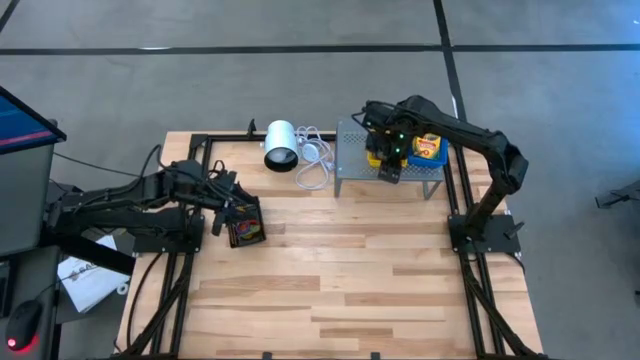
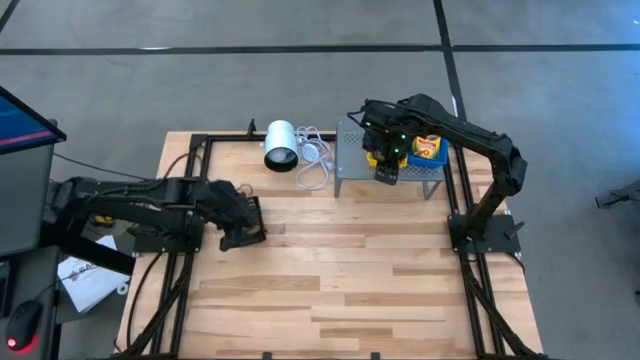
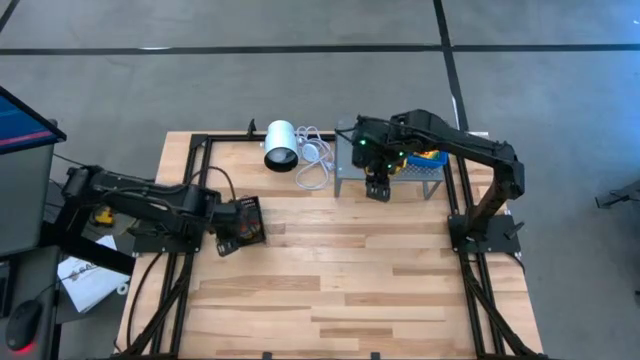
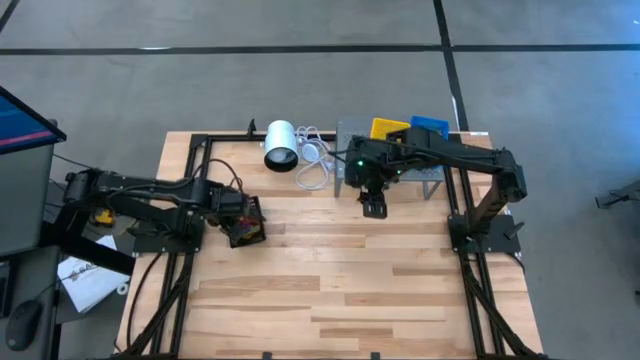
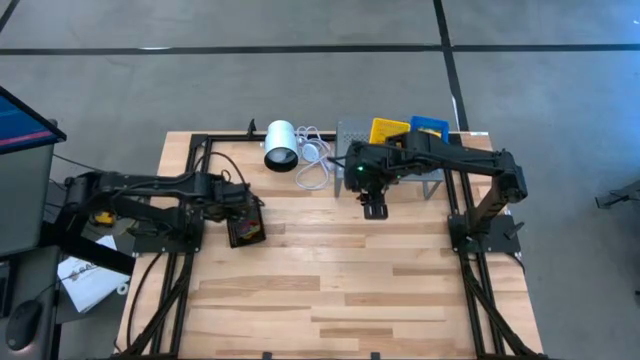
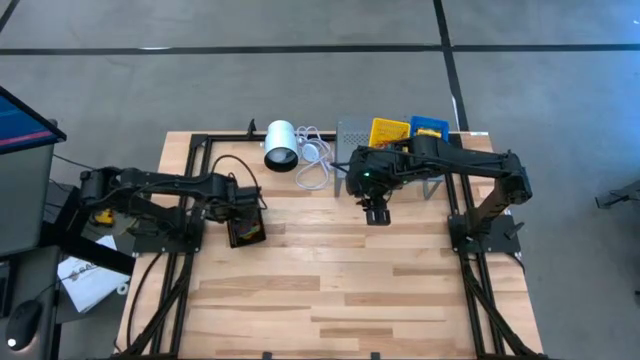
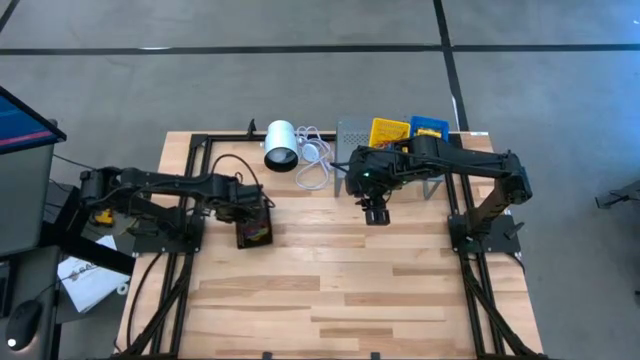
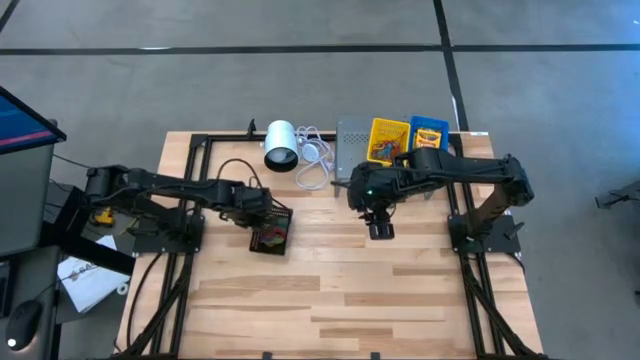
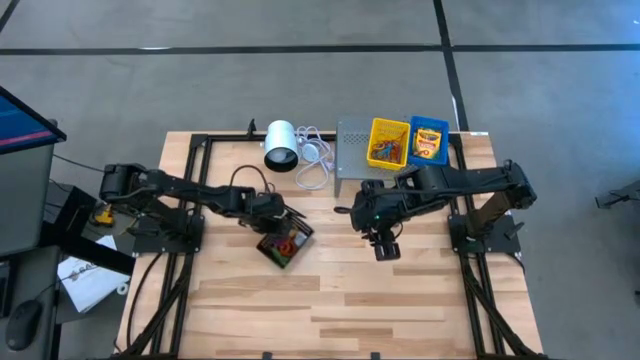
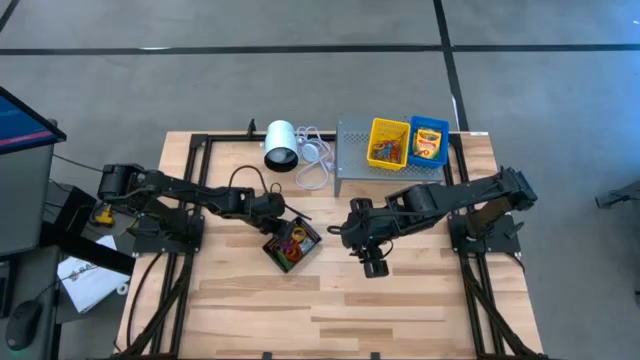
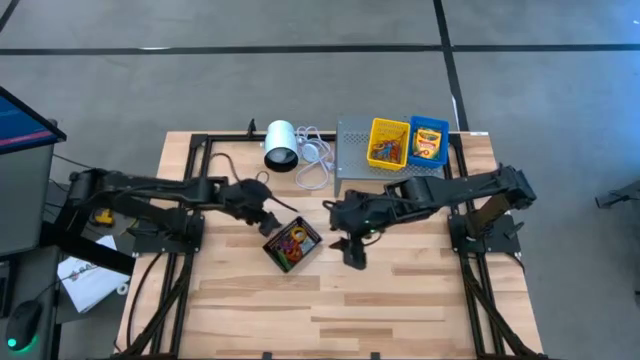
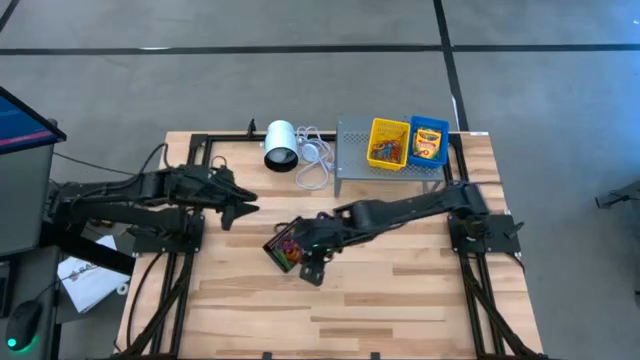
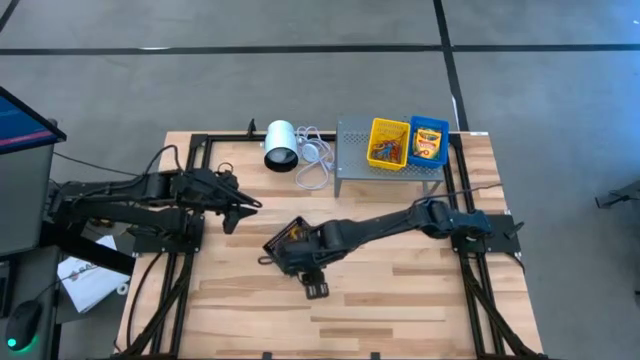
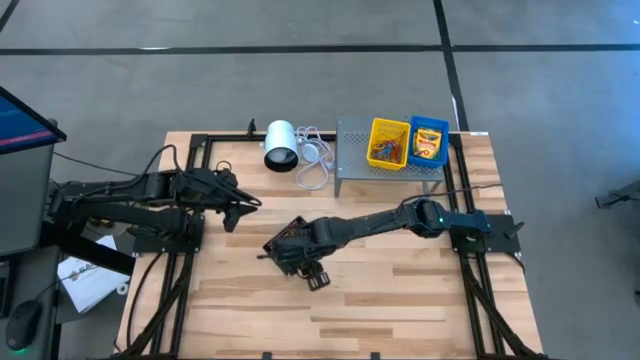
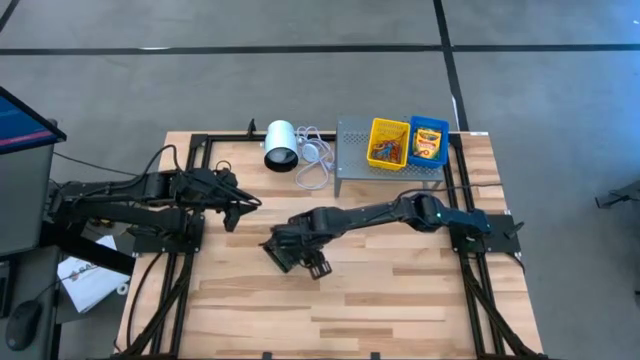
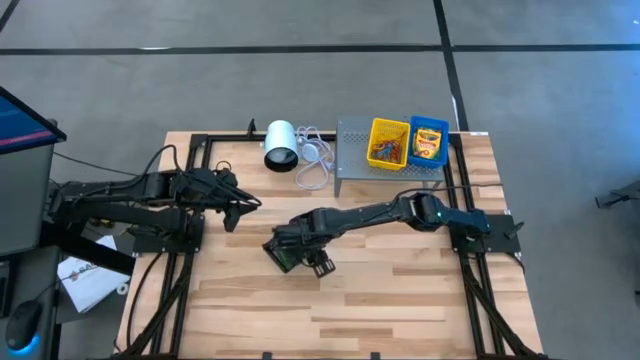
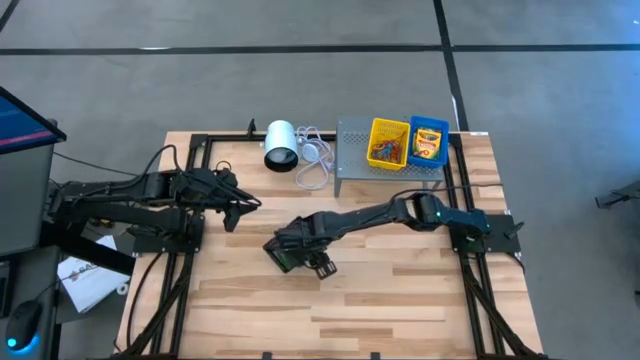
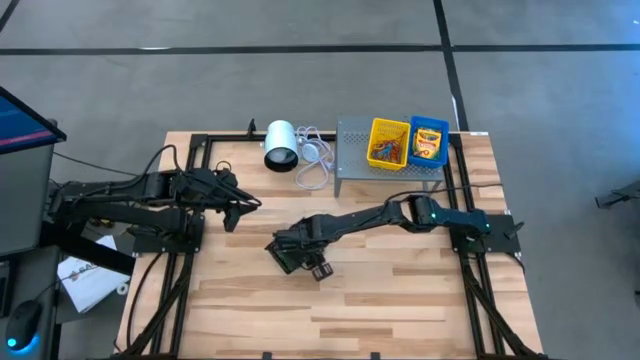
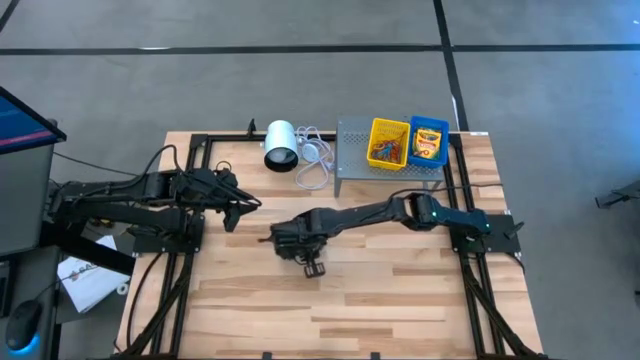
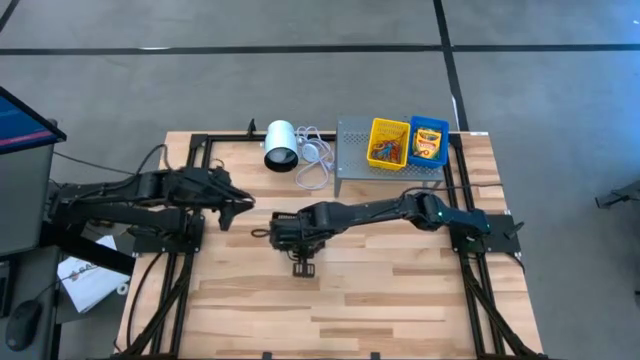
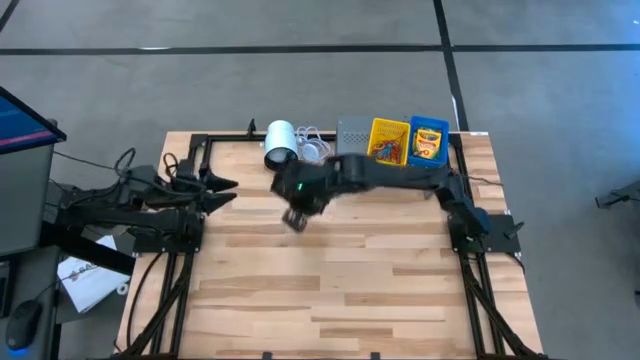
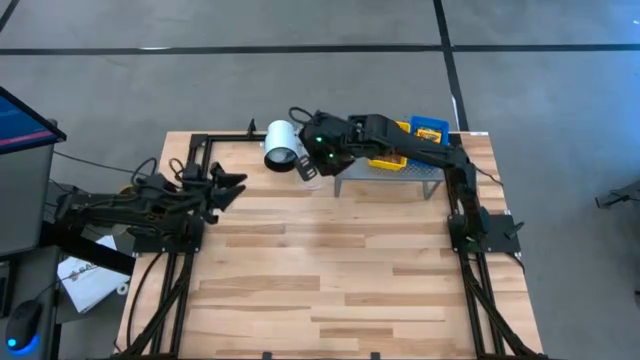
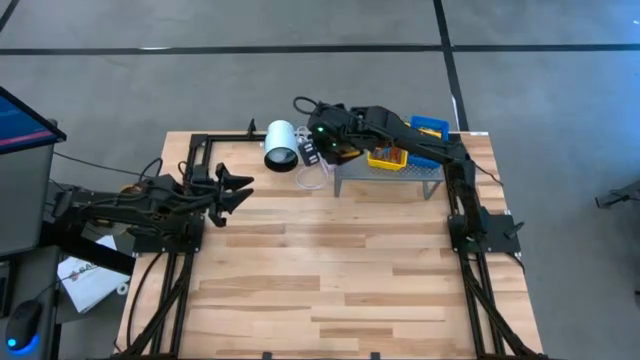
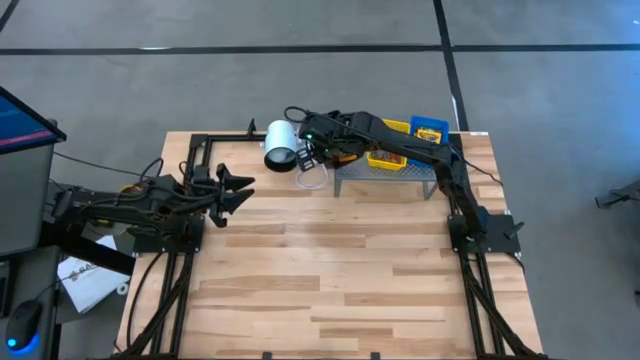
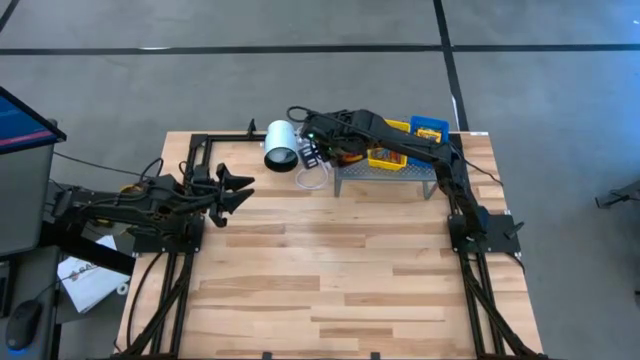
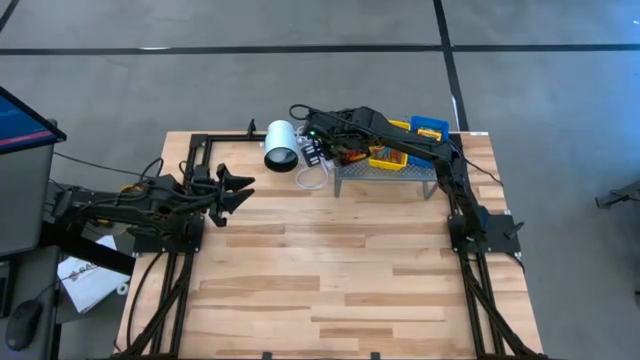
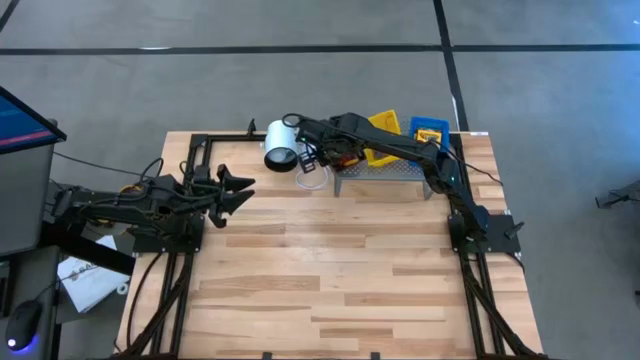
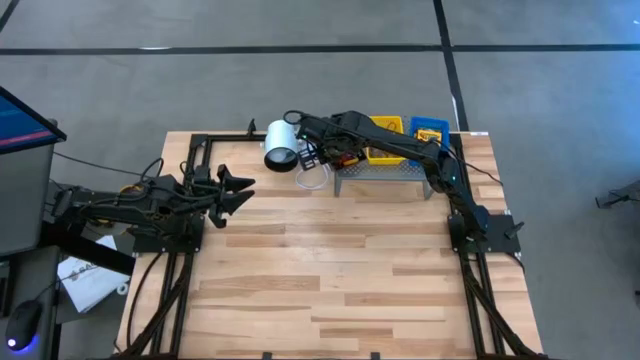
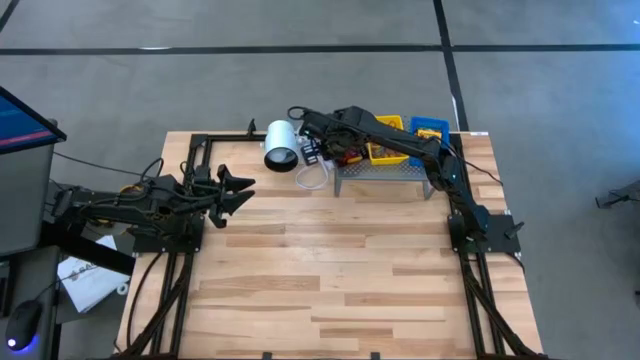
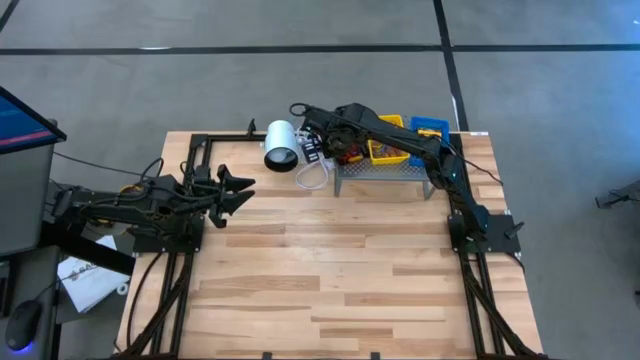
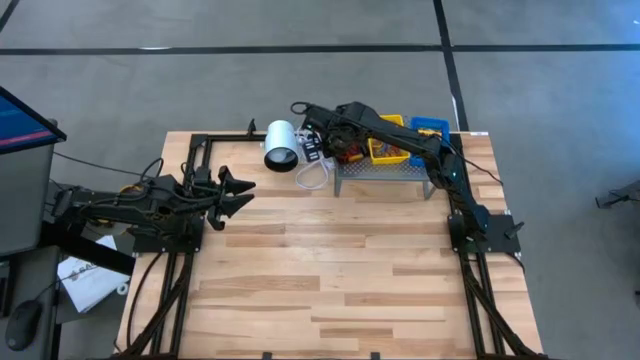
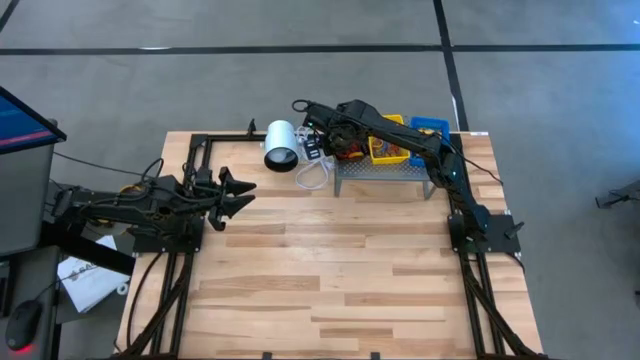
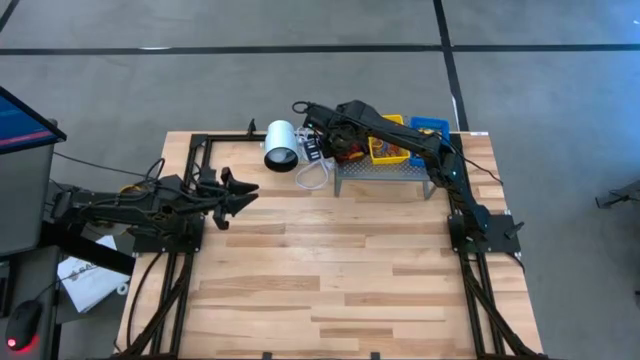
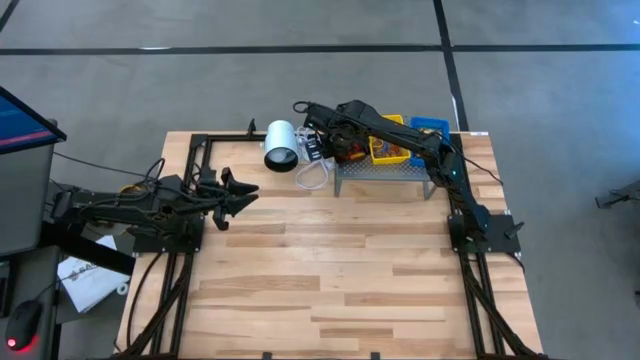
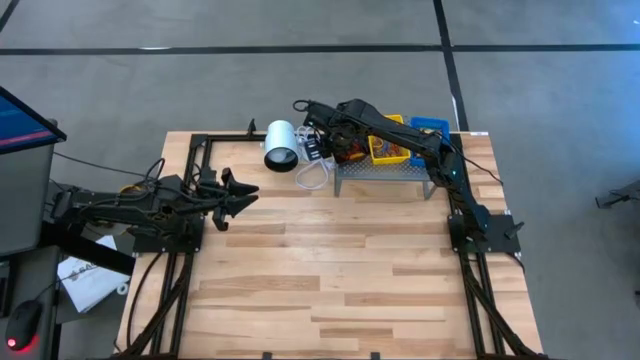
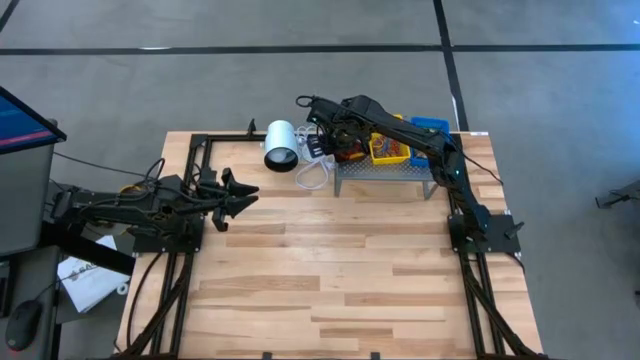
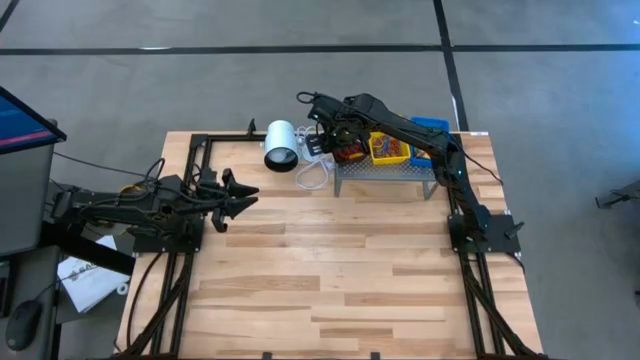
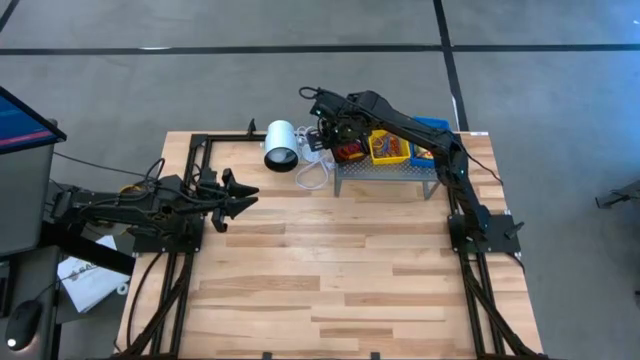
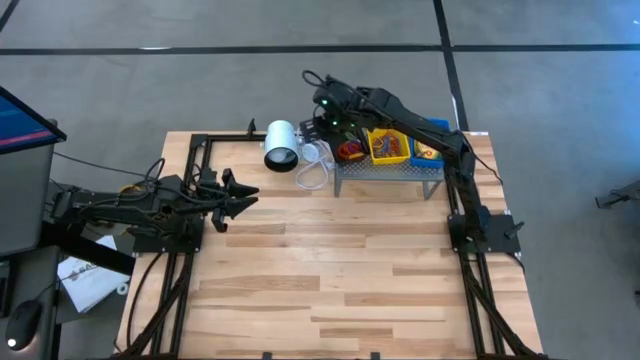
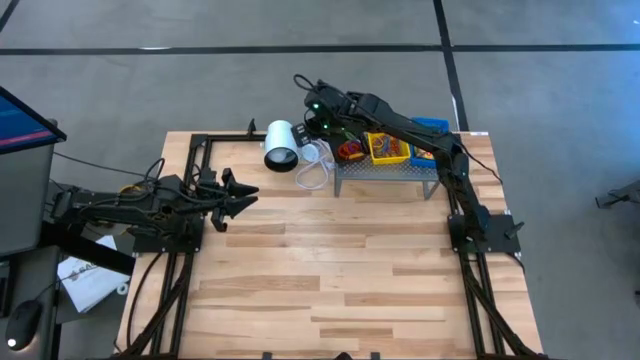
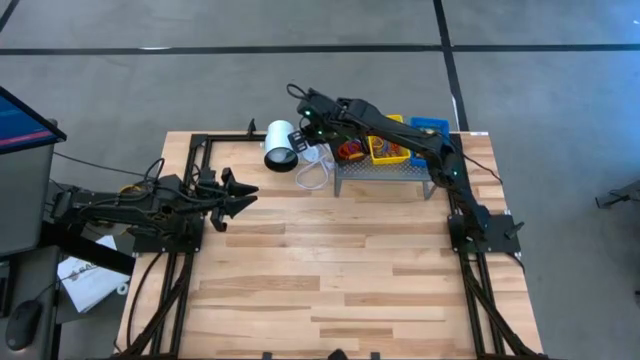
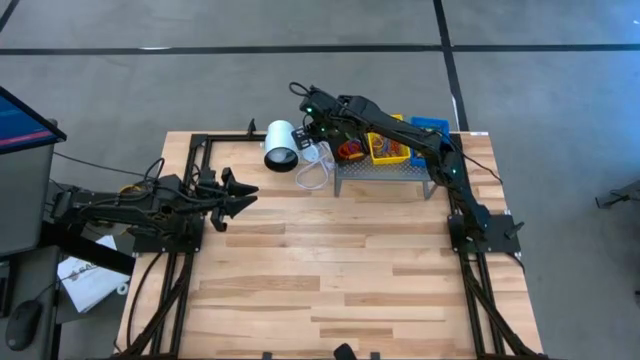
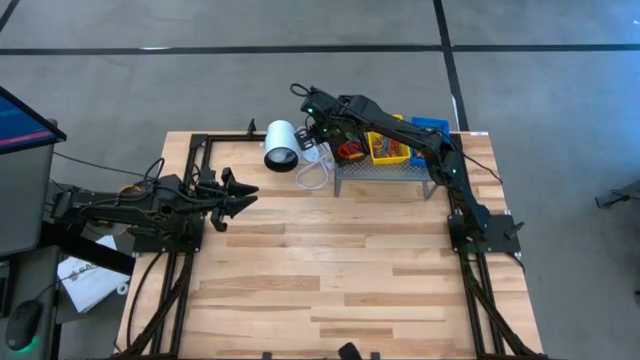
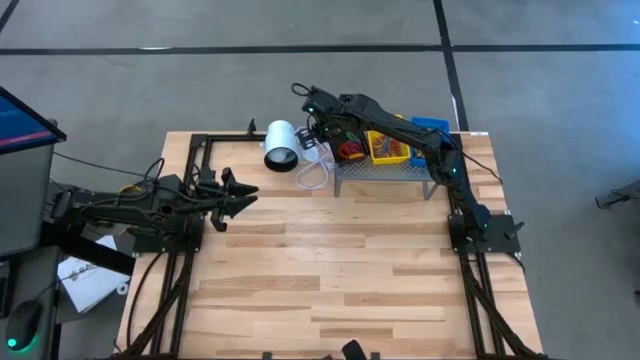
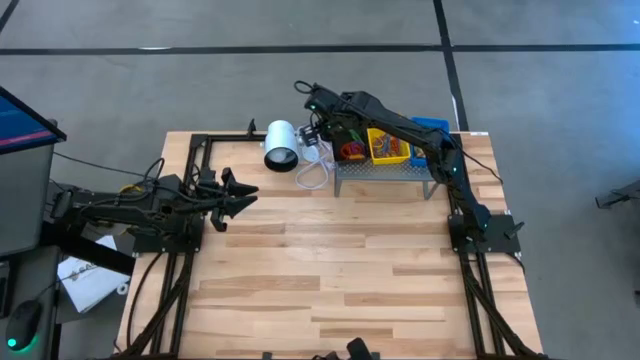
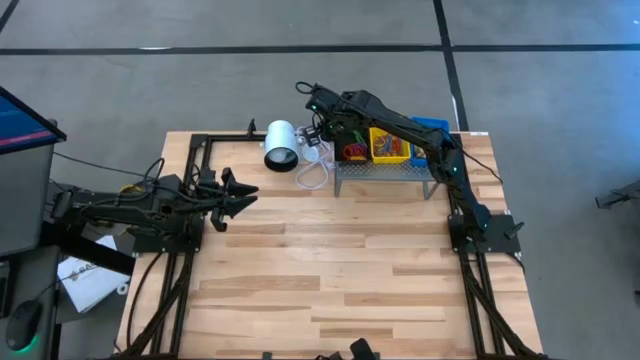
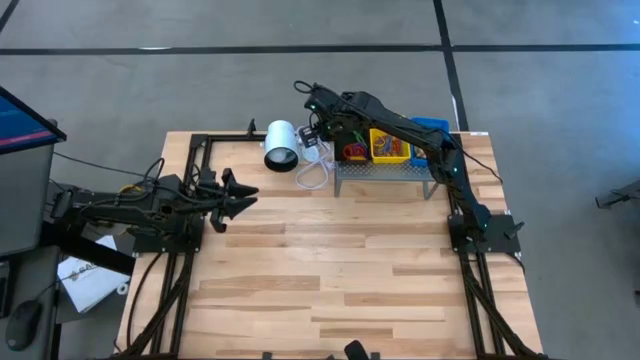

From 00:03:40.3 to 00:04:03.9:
Task: Pick & Place Office Desk Supplies
Put the black bin on the shelf
